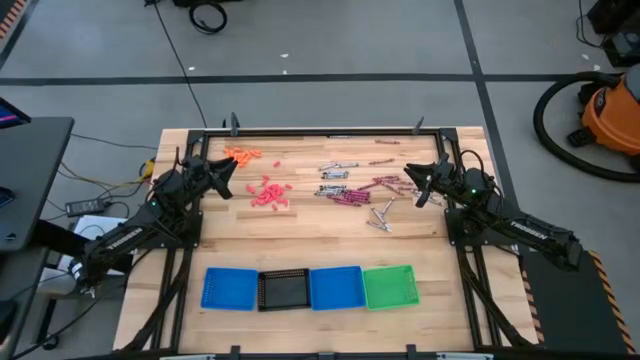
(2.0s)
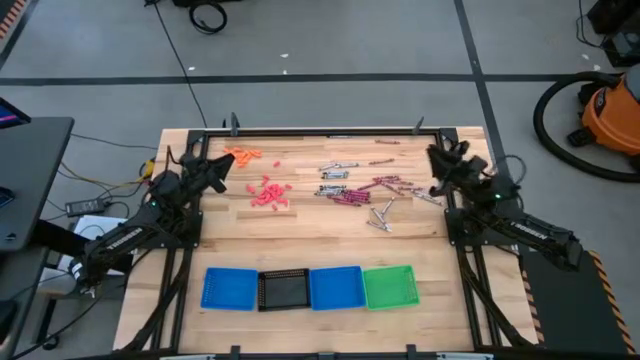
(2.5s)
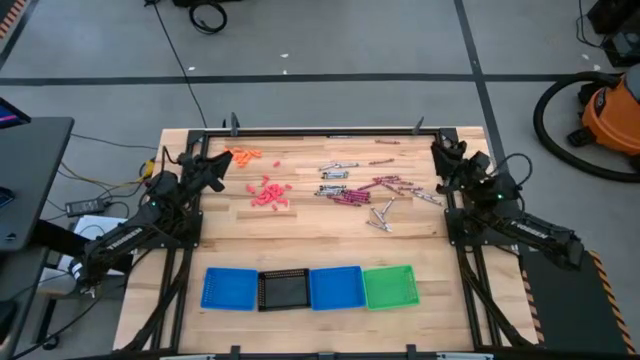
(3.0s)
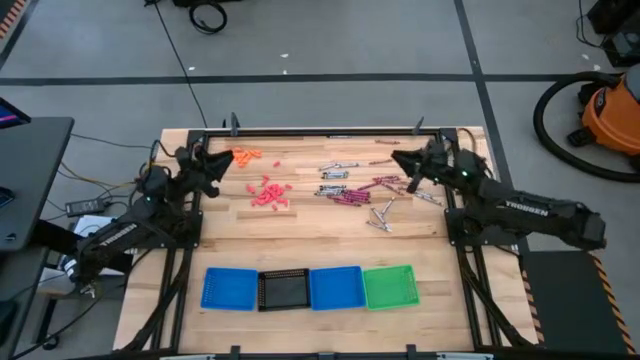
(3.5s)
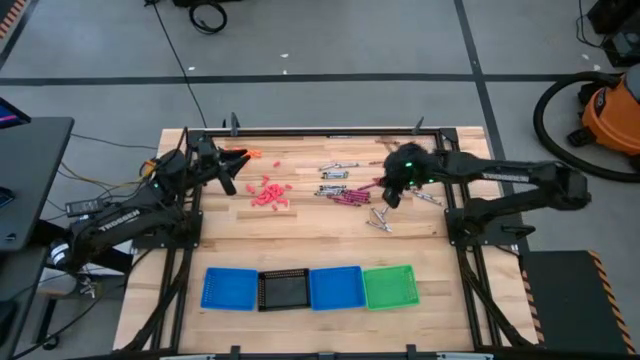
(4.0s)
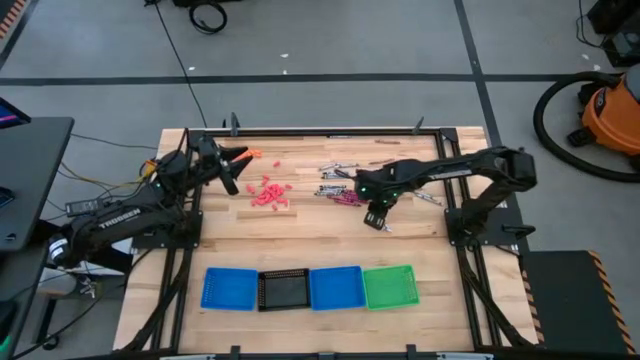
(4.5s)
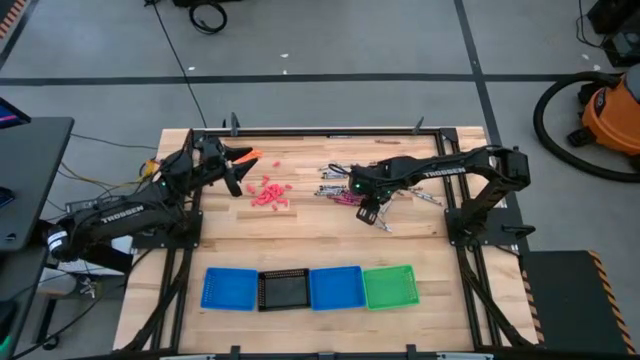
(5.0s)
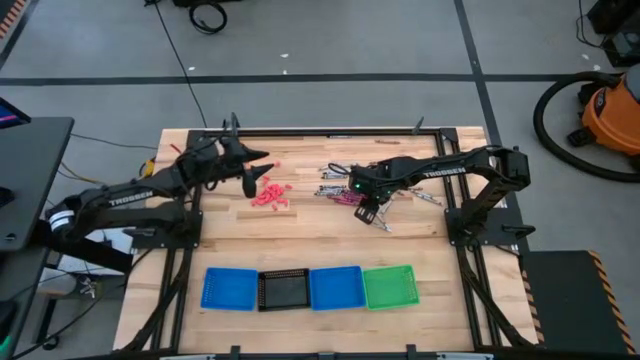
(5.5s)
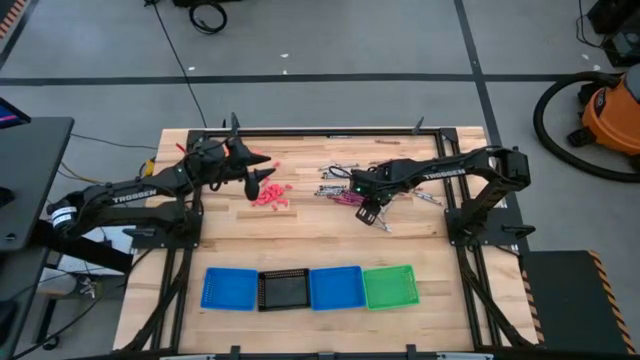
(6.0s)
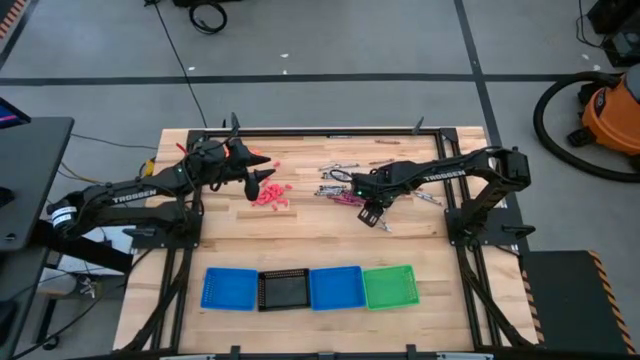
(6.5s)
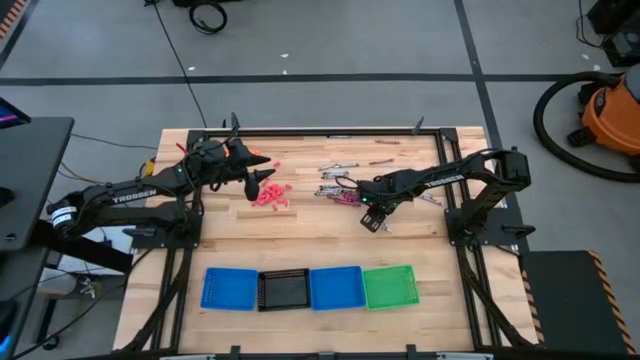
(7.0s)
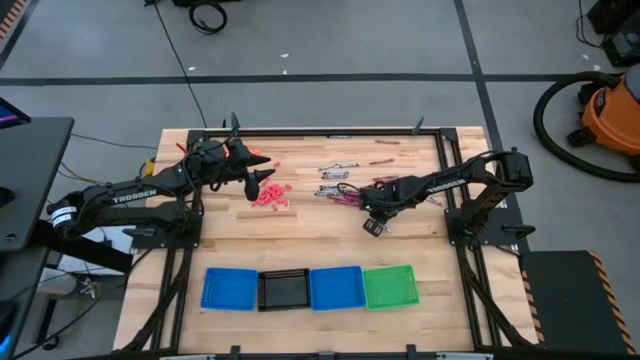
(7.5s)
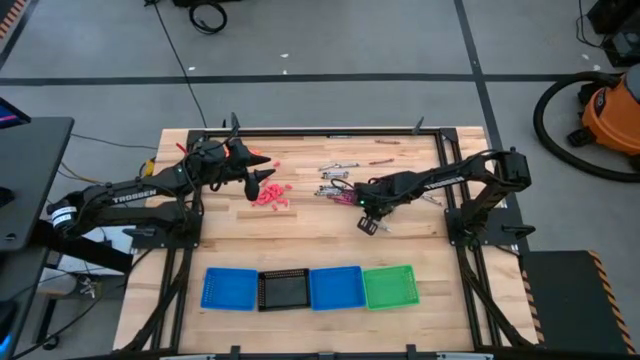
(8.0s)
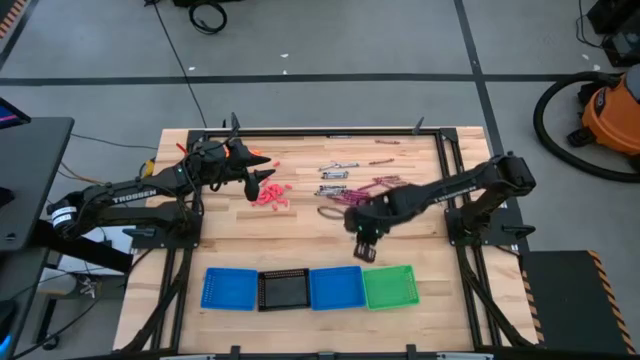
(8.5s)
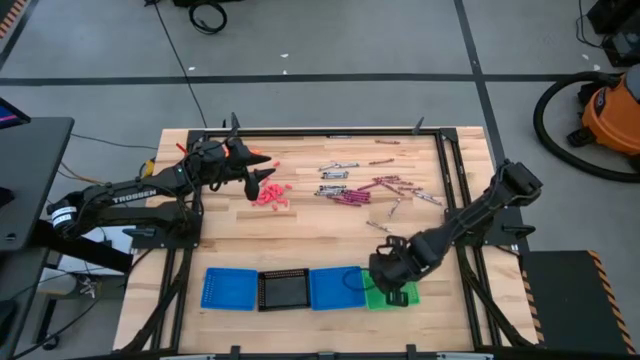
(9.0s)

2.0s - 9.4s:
Task: Sort crayons
Put the white crayon into the green bin

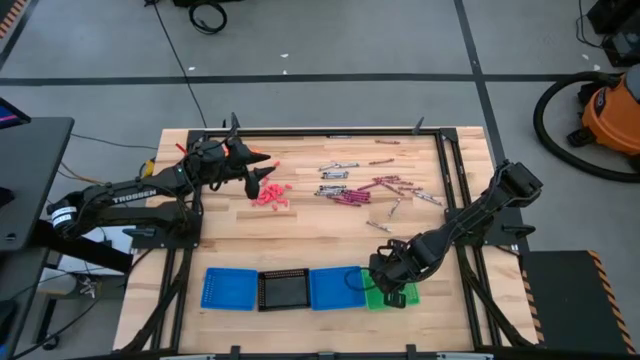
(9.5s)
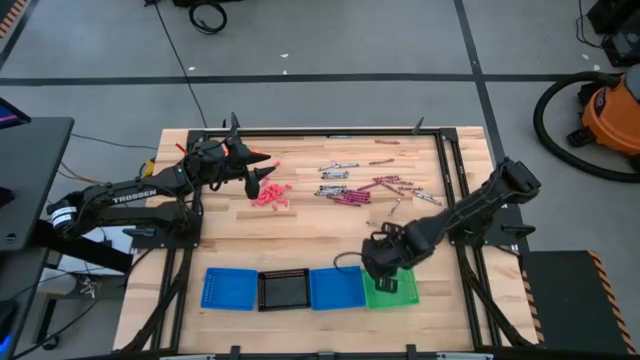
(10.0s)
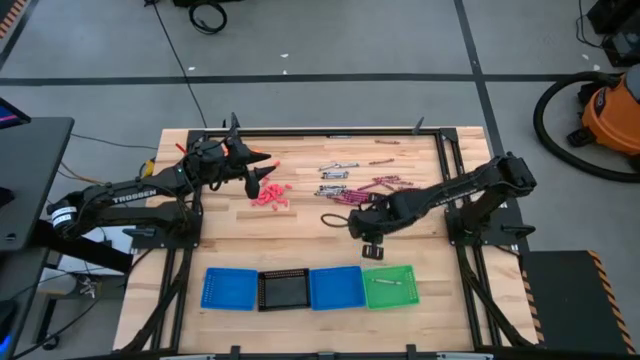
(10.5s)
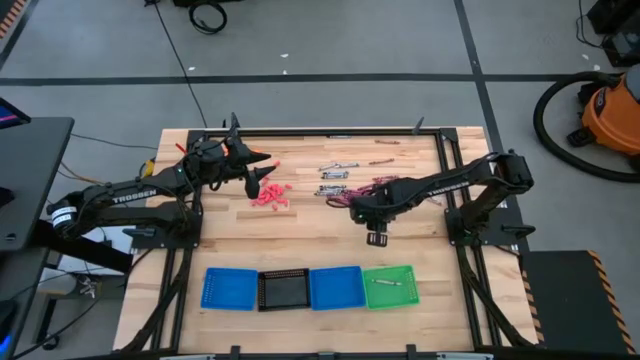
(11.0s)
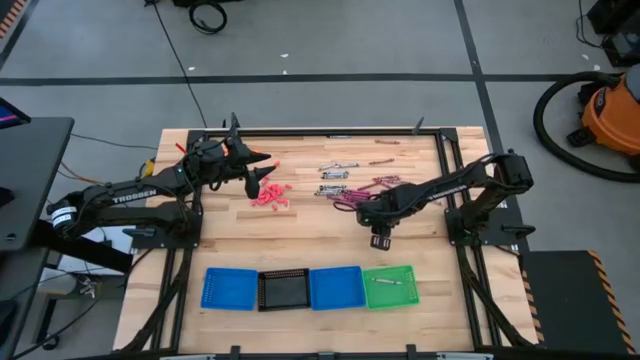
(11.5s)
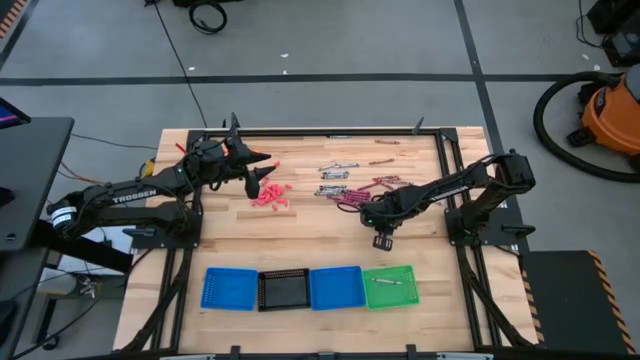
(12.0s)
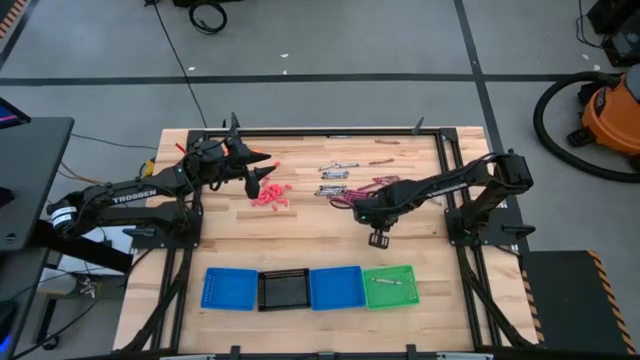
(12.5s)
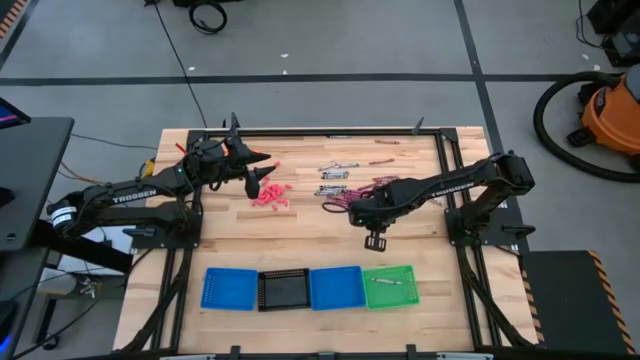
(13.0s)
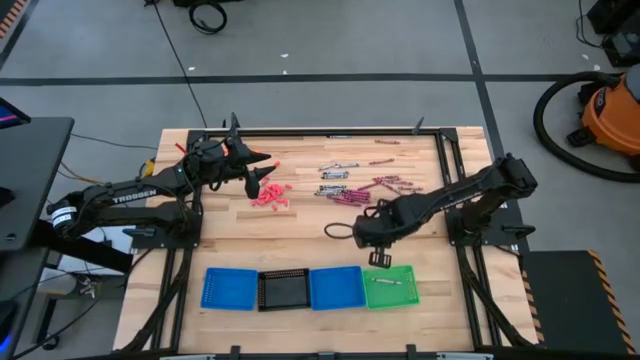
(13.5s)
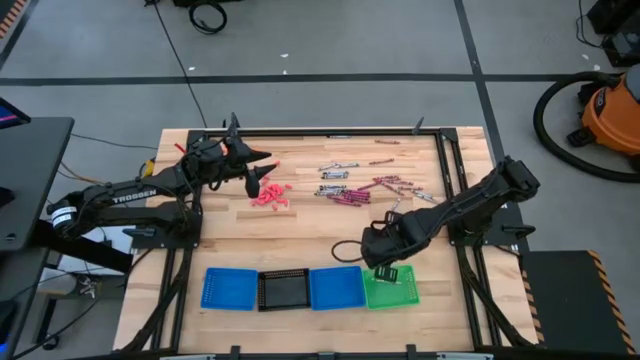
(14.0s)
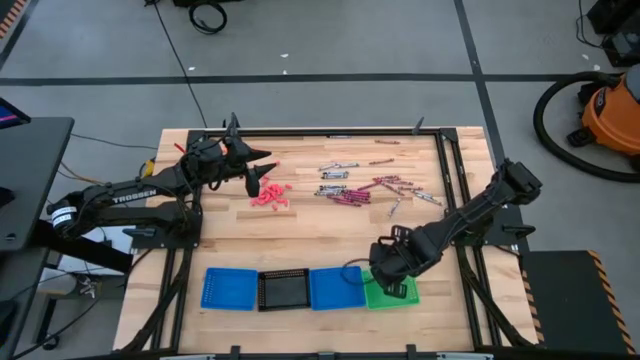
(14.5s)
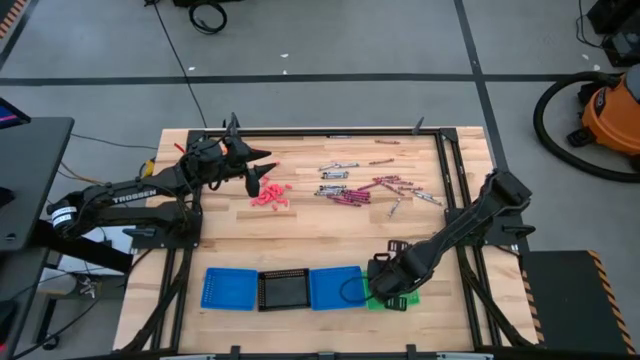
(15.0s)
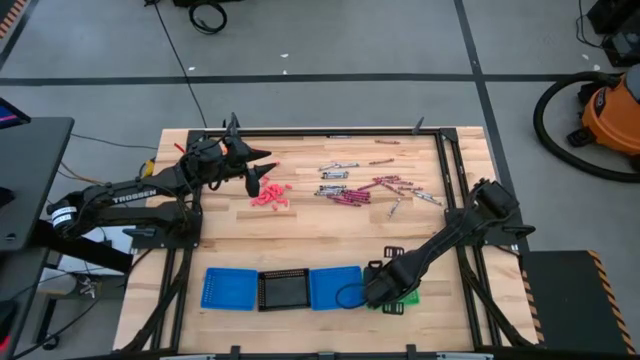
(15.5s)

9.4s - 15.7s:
Put the white crayon into the green bin

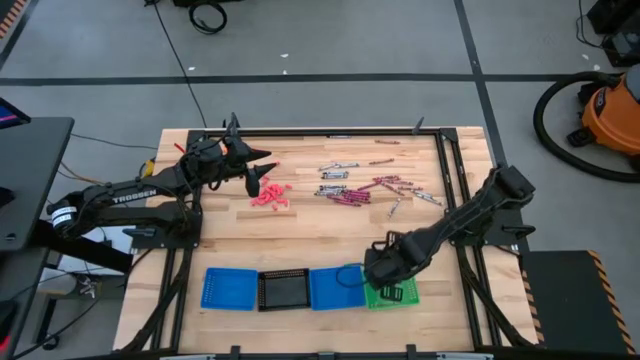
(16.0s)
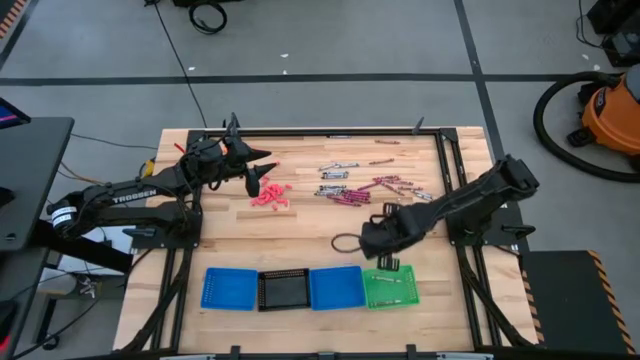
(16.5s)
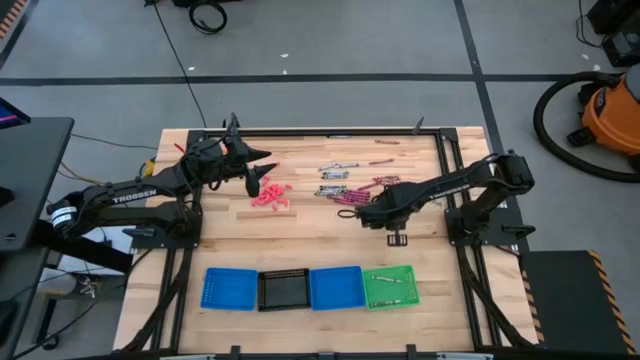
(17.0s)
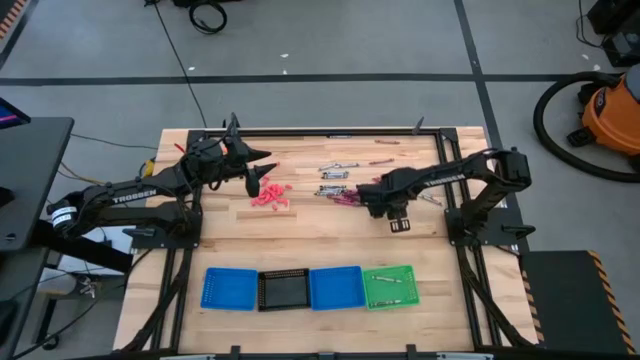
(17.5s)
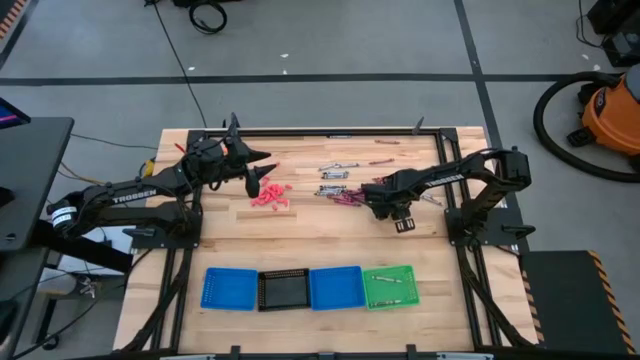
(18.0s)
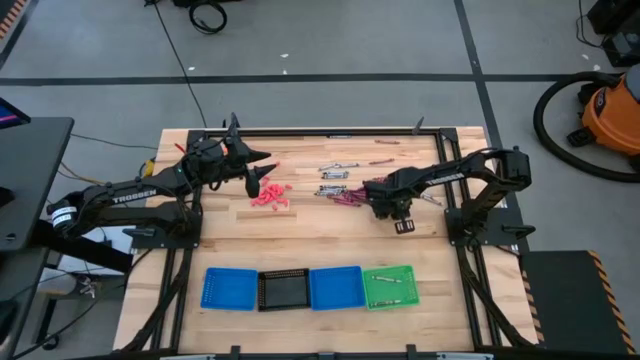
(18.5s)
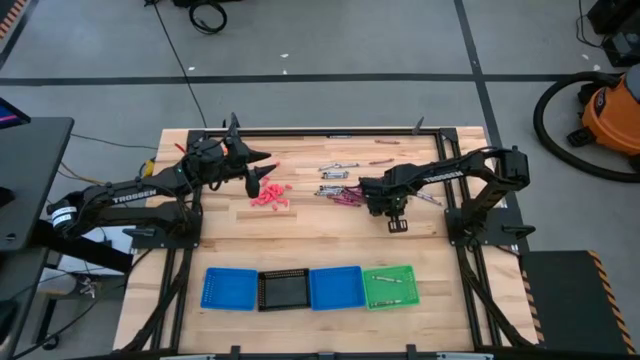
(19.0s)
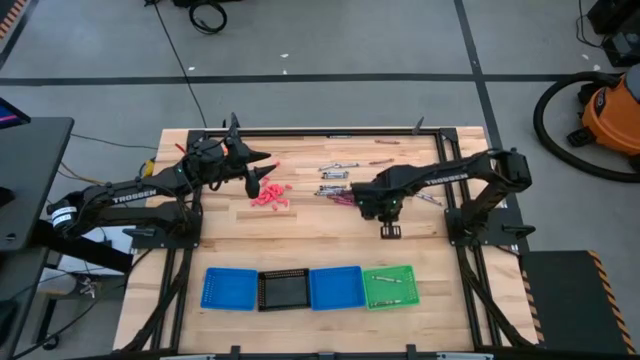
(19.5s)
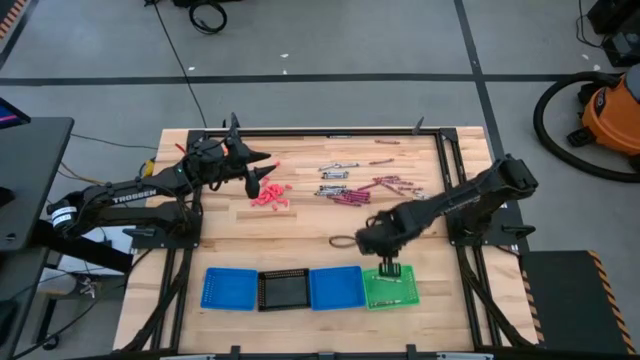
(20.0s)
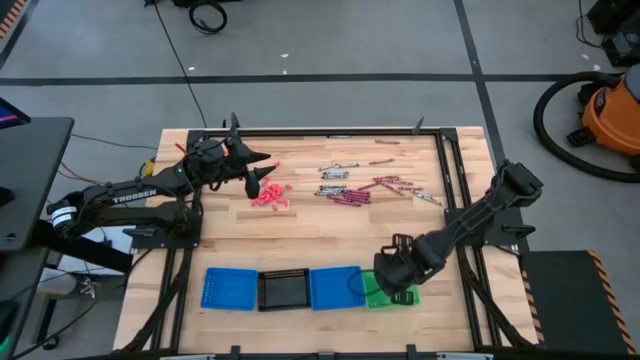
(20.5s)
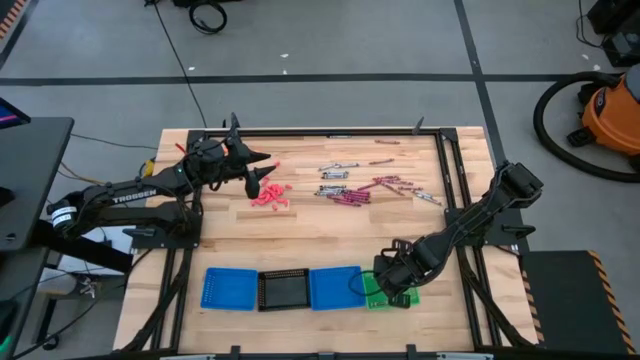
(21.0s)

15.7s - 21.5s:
Put the white crayon into the green bin

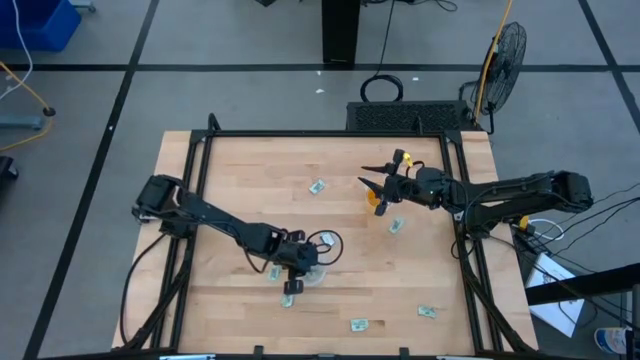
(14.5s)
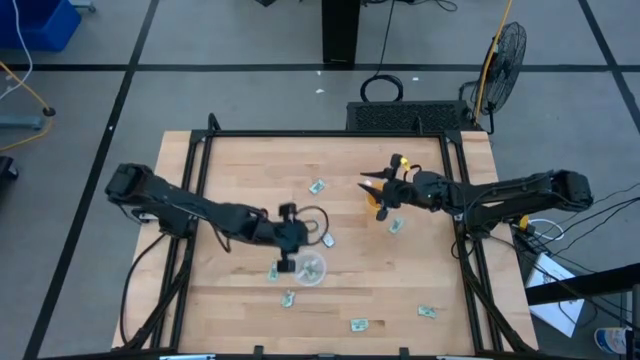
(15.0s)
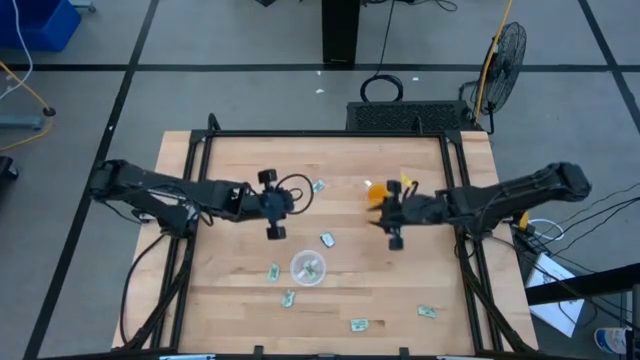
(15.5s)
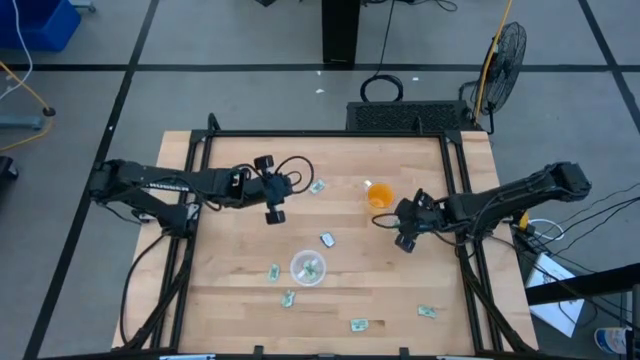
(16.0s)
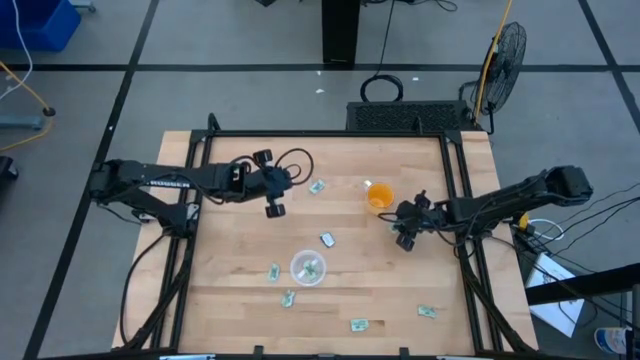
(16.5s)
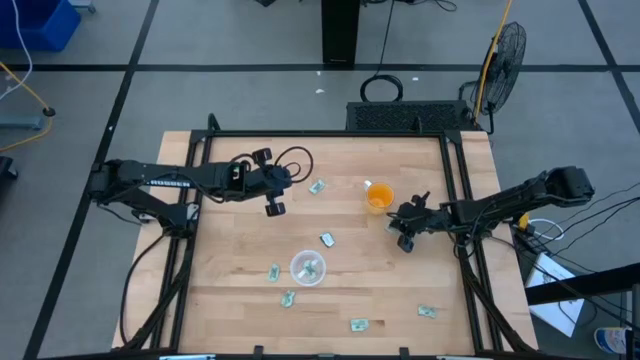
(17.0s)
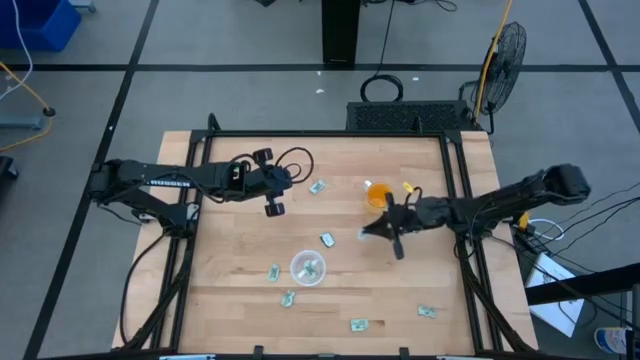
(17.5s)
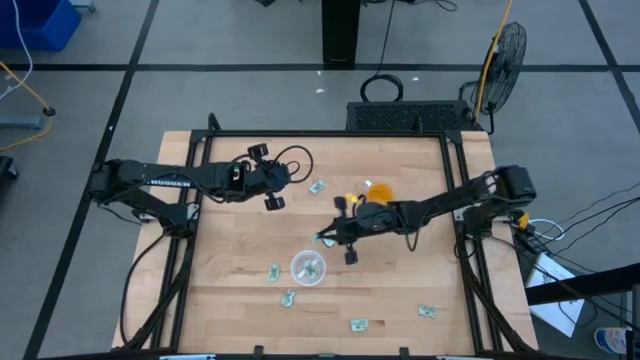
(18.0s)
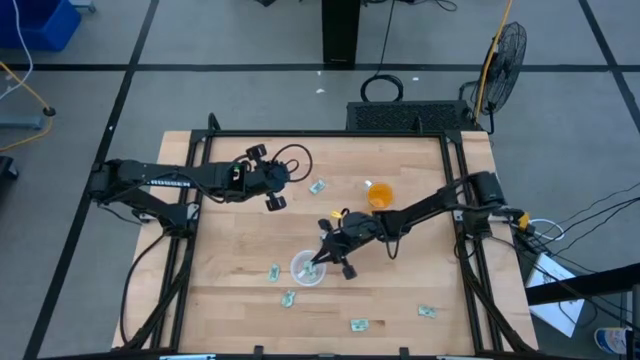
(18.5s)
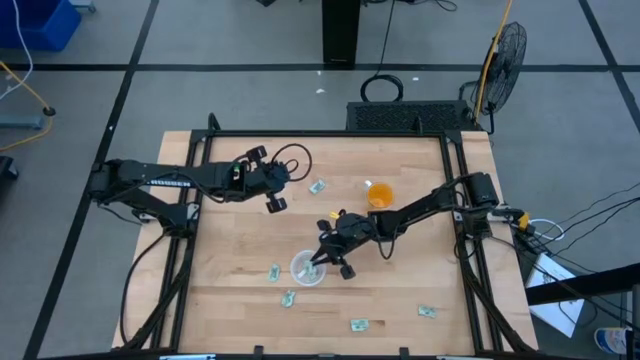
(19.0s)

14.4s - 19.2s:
Task: Pick and place items into bin
Put the white stevia packet into the transparent bin
